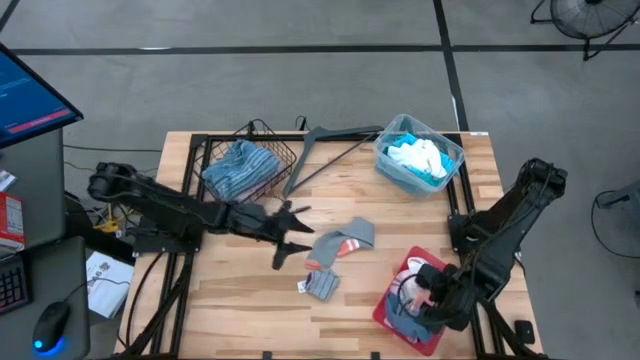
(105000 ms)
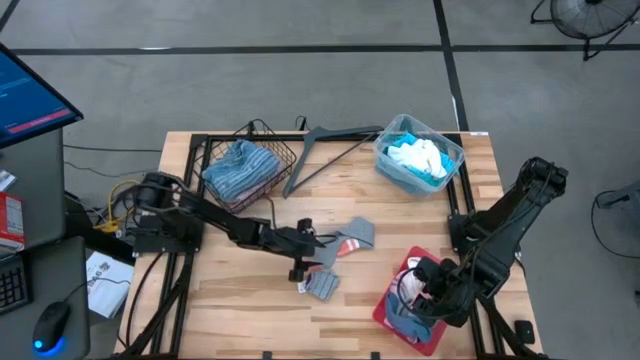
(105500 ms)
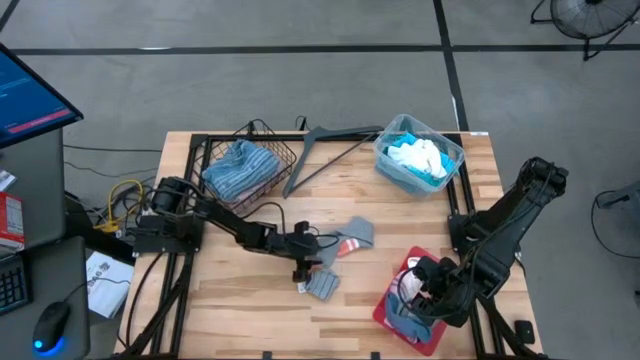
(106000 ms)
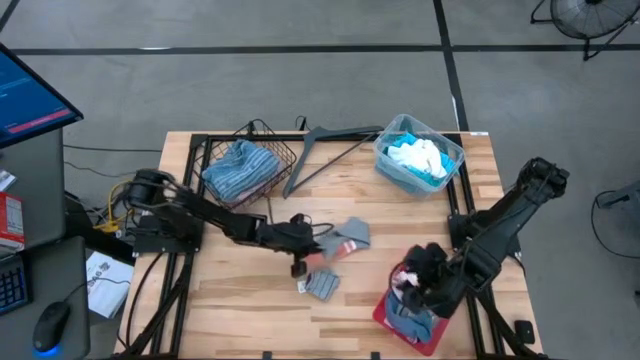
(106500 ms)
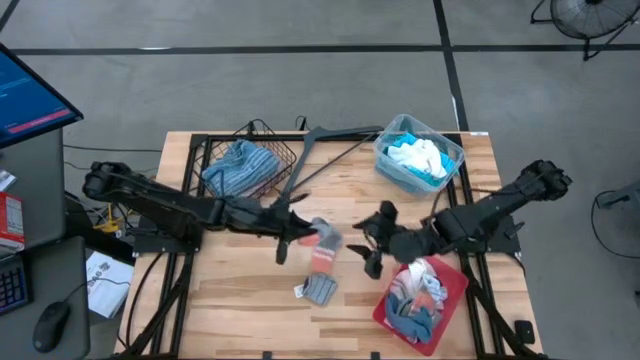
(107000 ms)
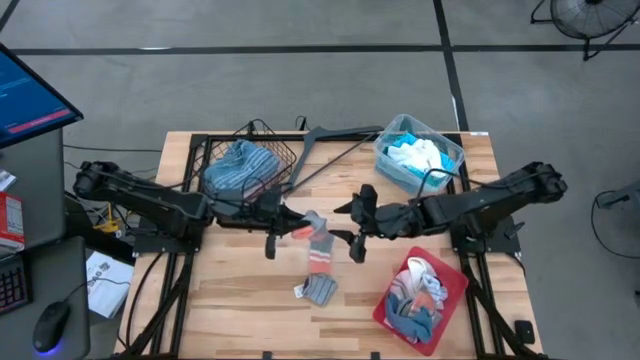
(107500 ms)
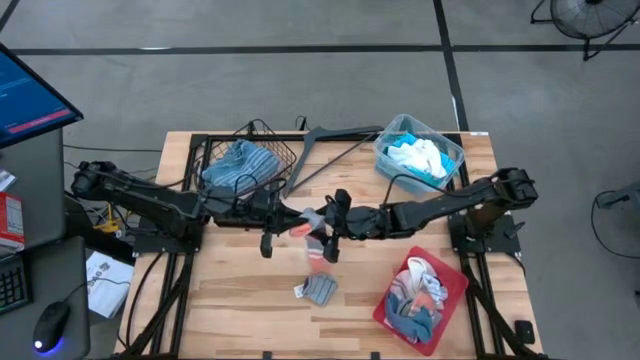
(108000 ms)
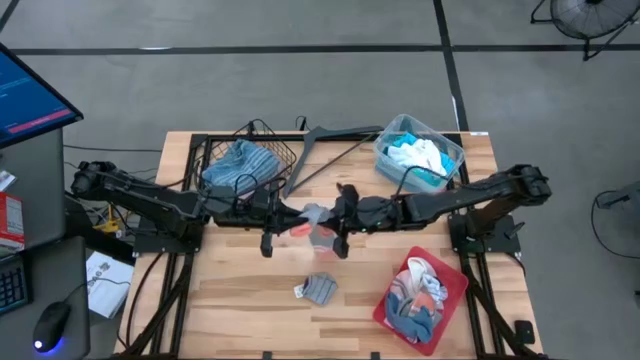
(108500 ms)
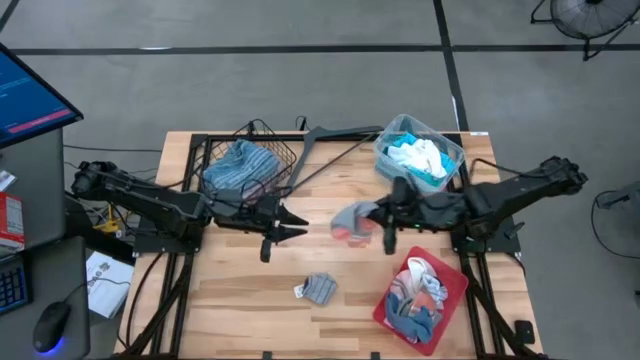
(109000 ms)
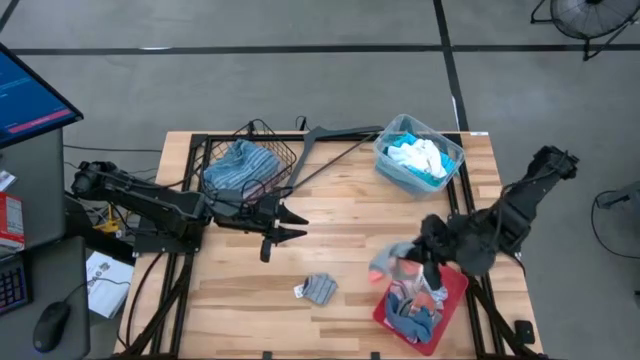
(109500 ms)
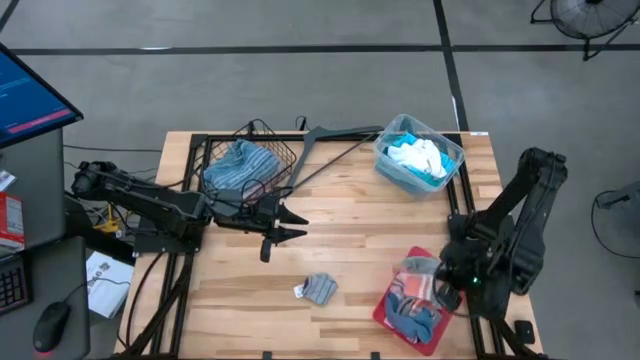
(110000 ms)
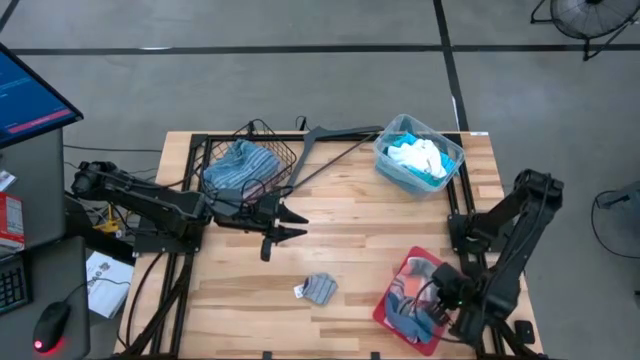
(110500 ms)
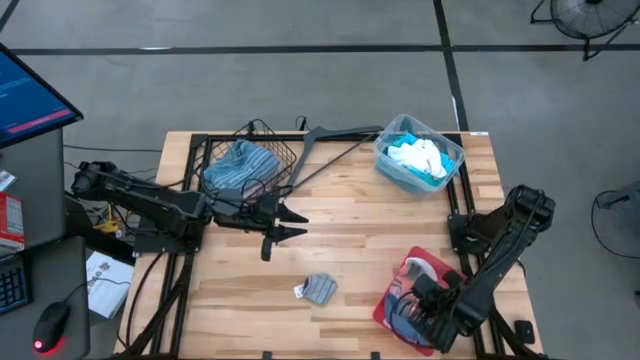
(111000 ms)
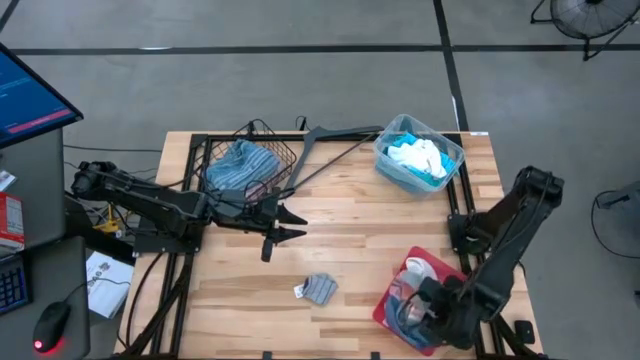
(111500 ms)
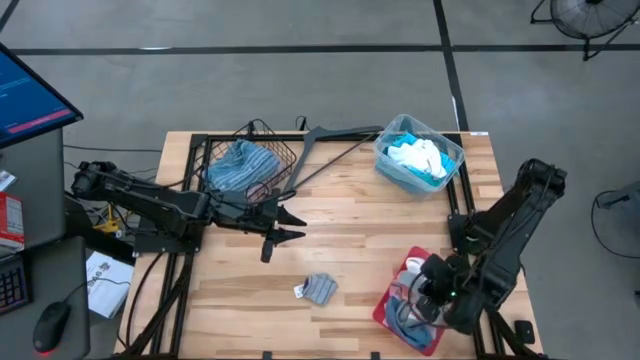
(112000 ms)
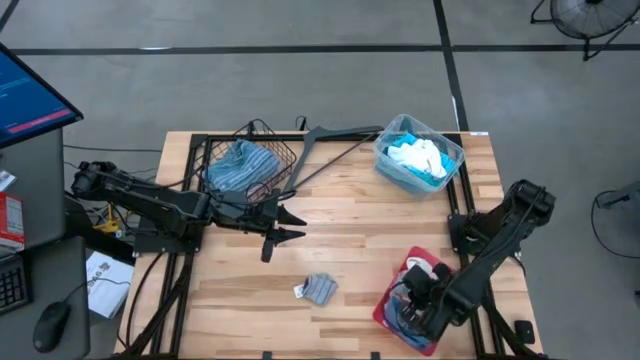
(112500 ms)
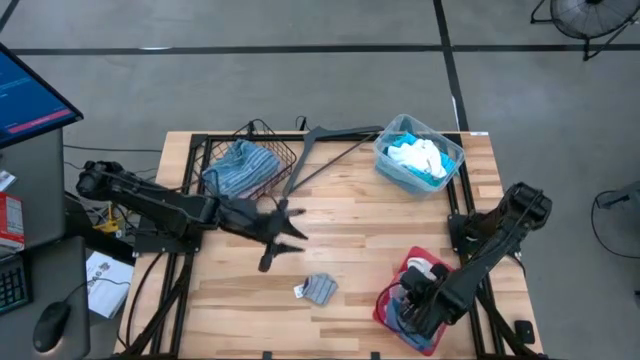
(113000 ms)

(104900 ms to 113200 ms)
Task: Pick & Place Cloths
Put the gray sock into the red bin

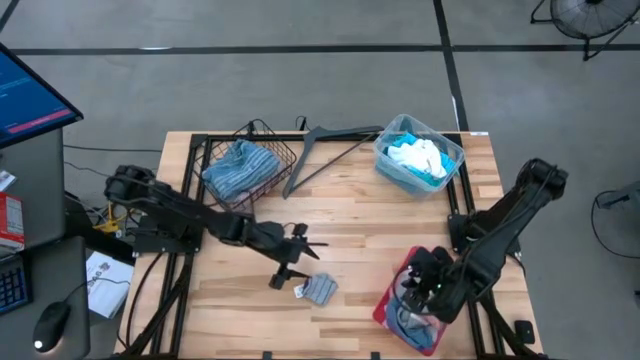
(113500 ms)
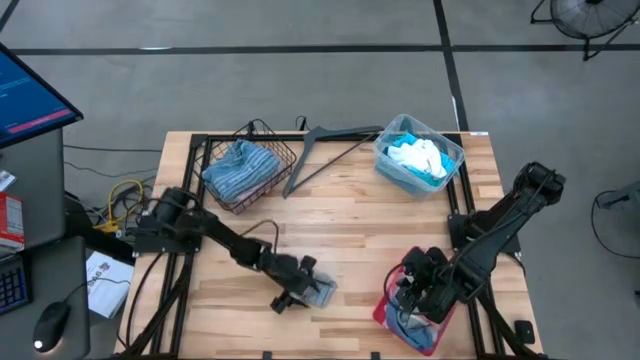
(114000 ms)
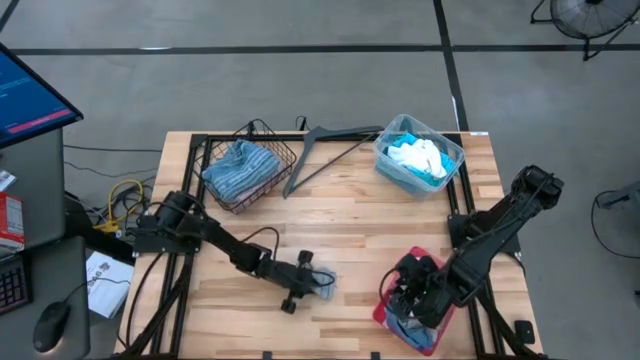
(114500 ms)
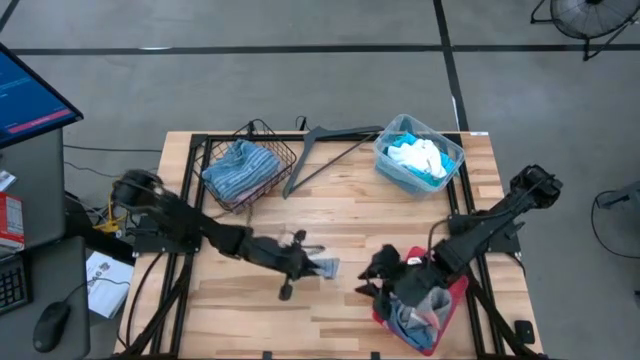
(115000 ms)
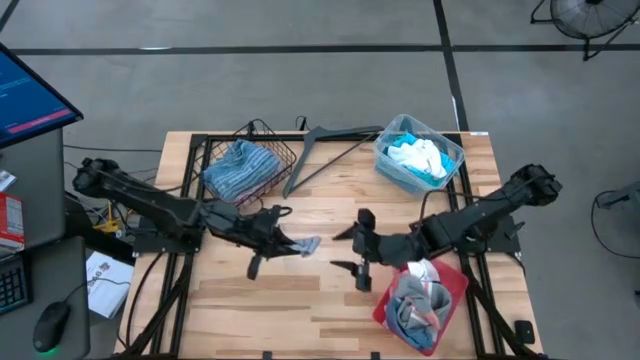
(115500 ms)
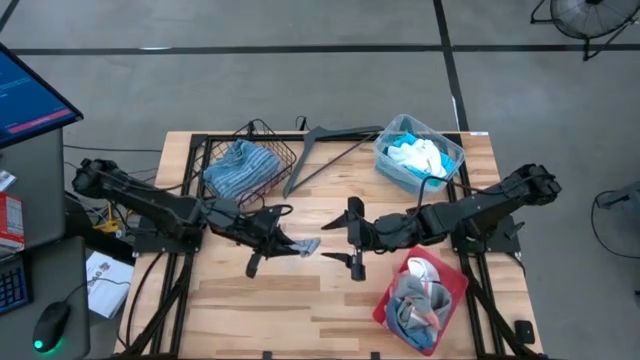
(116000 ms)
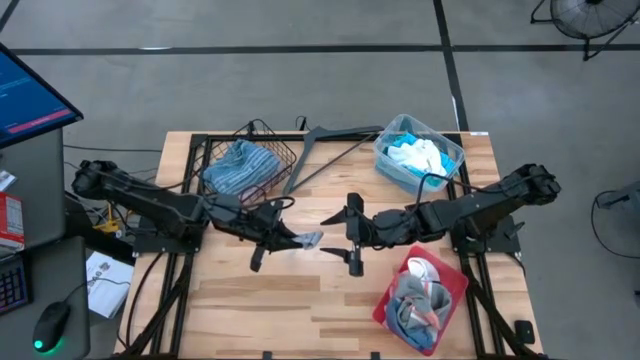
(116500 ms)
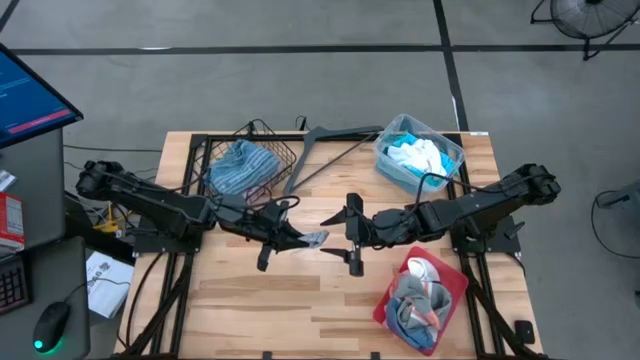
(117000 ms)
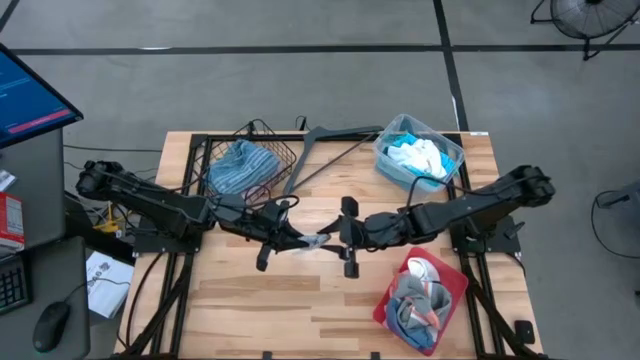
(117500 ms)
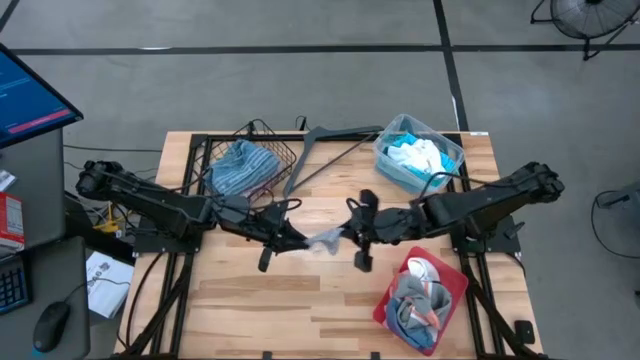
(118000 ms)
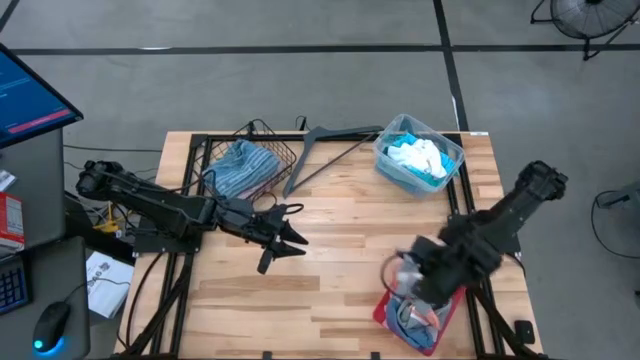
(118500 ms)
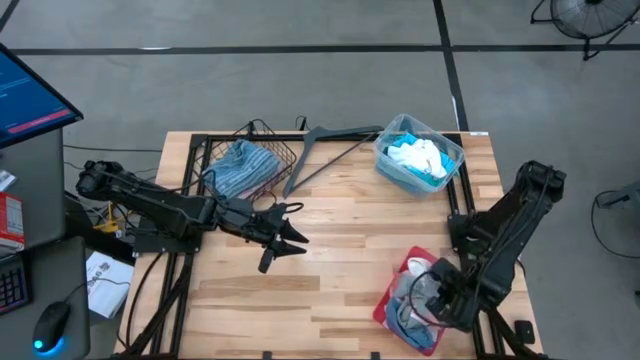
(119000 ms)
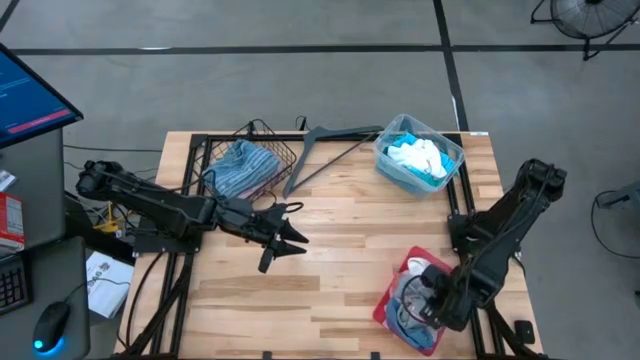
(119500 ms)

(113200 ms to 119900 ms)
Put the gray patterned sock into the red bin

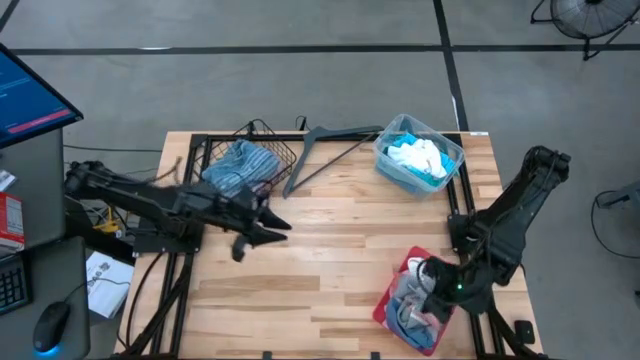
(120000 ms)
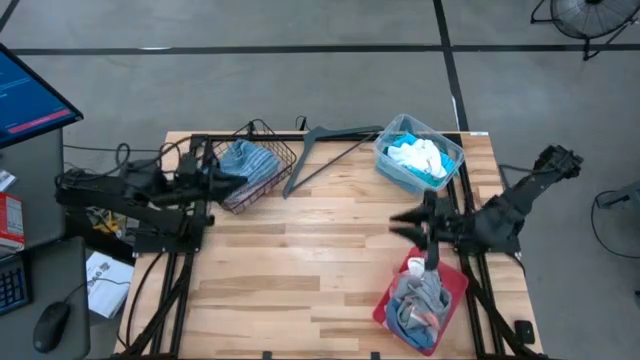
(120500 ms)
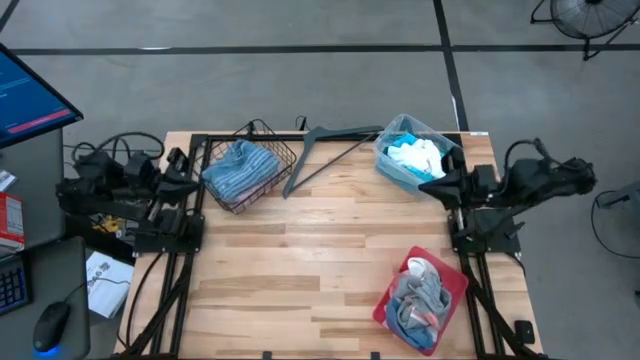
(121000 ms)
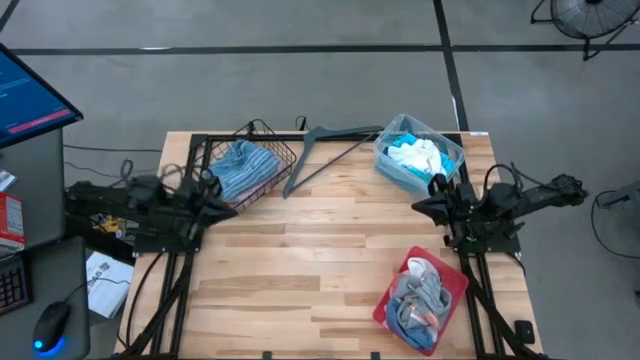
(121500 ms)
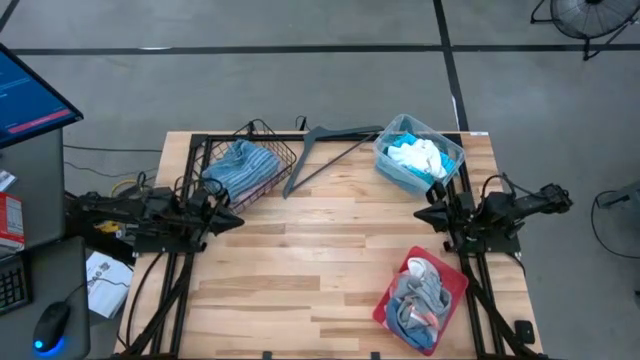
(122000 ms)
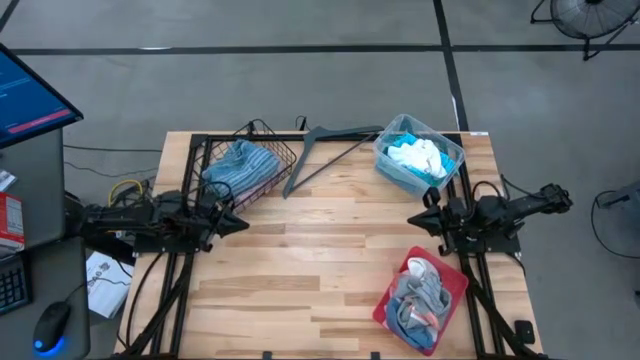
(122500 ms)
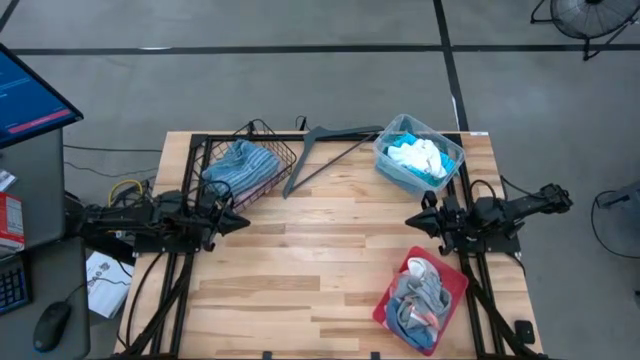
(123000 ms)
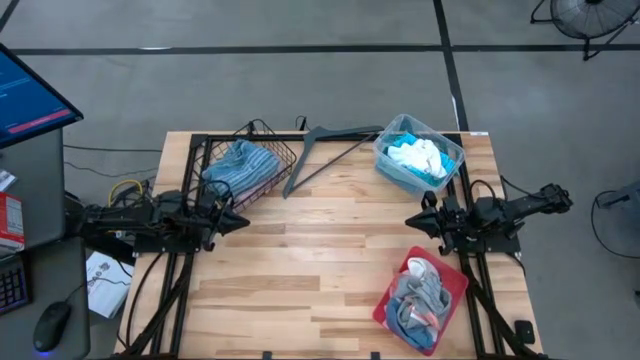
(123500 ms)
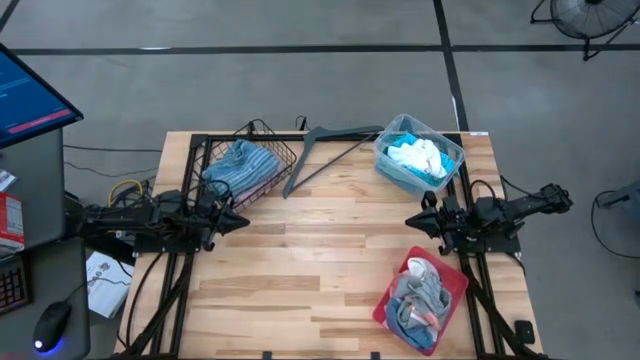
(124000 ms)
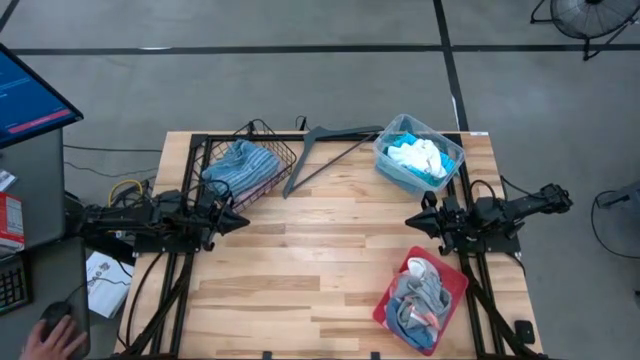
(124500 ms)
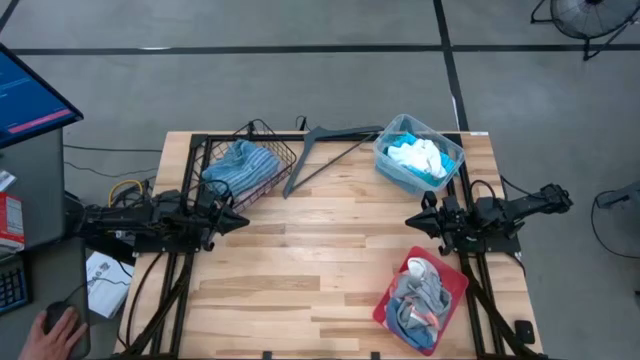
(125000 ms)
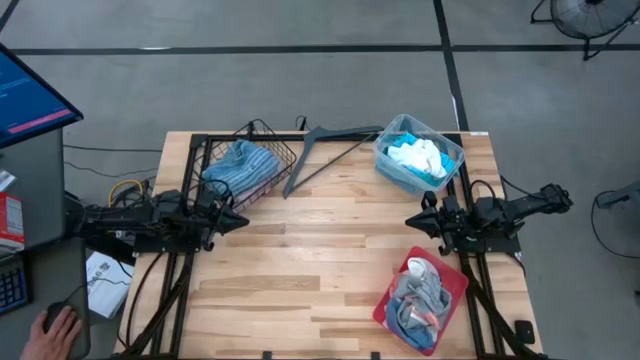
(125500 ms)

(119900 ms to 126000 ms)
Return to Home Position
